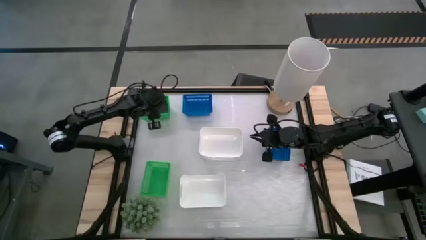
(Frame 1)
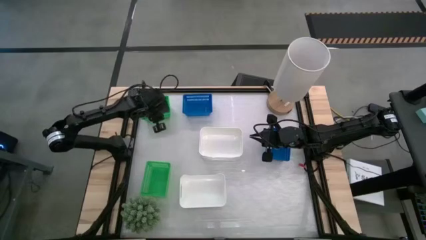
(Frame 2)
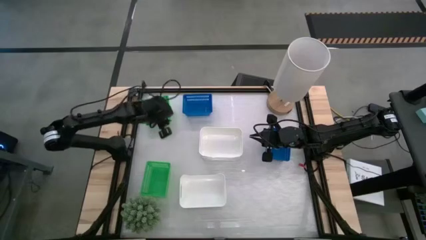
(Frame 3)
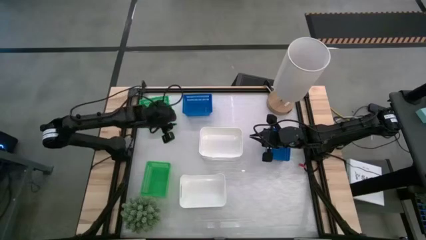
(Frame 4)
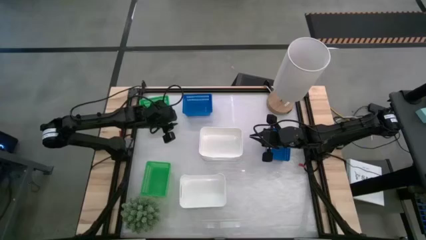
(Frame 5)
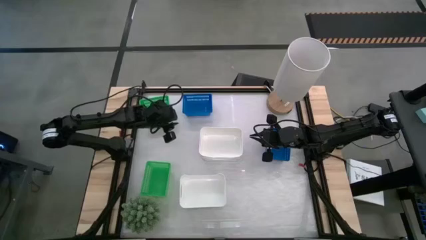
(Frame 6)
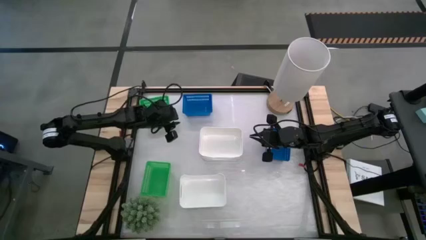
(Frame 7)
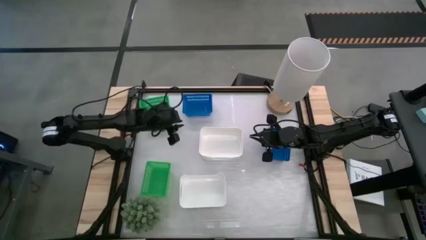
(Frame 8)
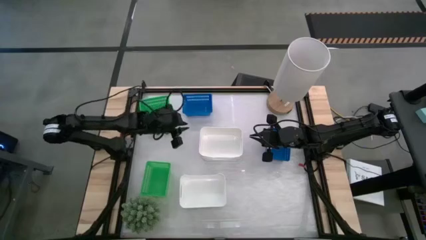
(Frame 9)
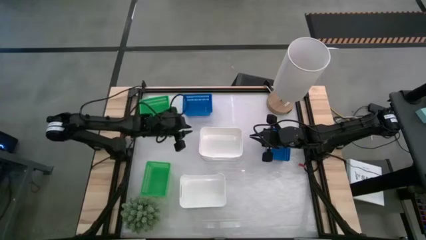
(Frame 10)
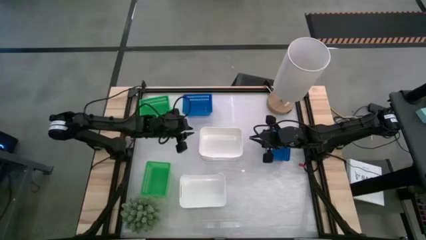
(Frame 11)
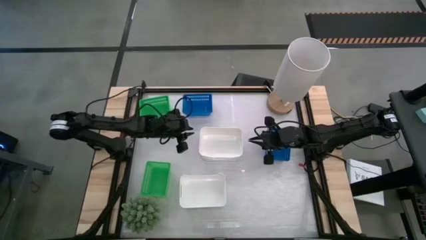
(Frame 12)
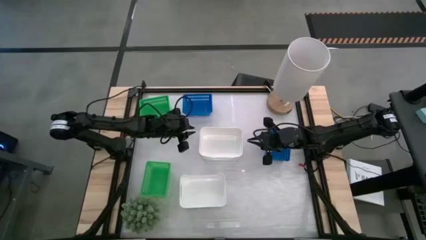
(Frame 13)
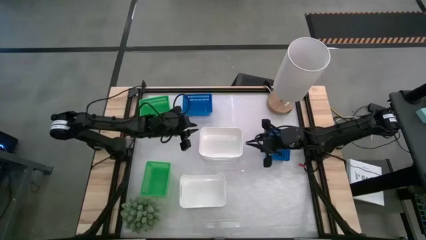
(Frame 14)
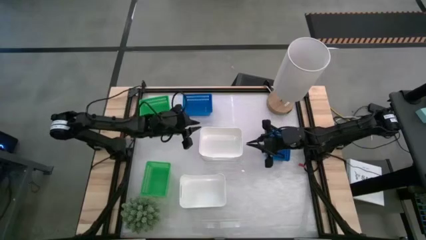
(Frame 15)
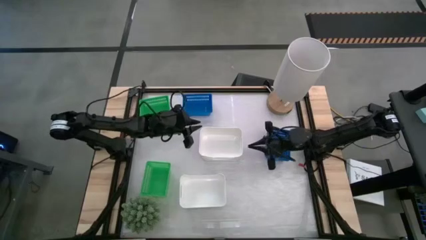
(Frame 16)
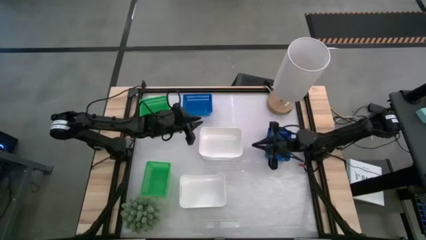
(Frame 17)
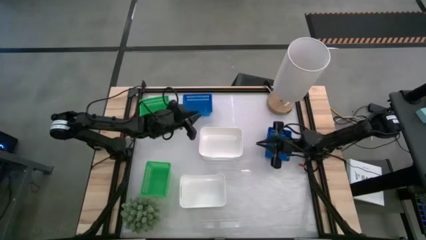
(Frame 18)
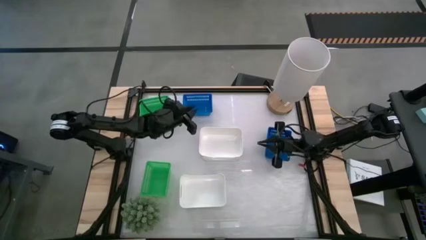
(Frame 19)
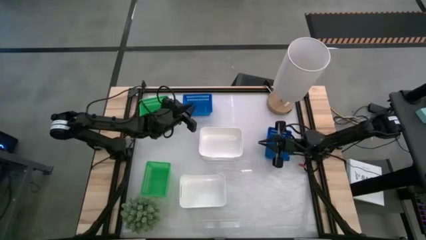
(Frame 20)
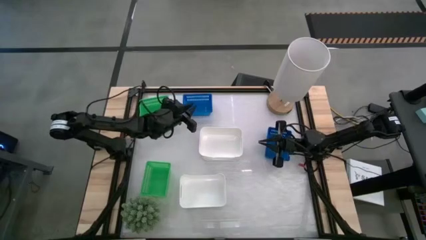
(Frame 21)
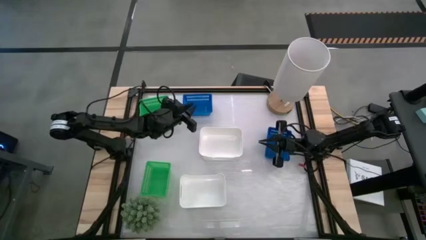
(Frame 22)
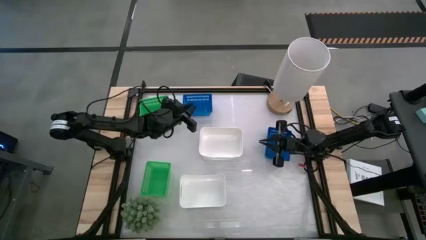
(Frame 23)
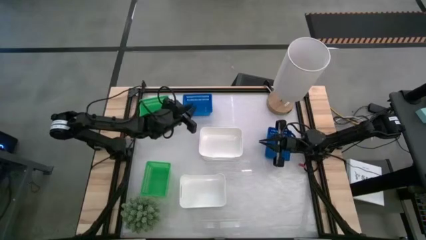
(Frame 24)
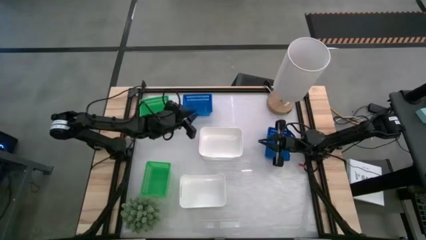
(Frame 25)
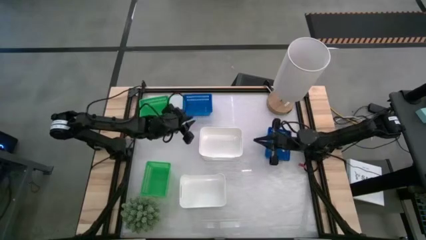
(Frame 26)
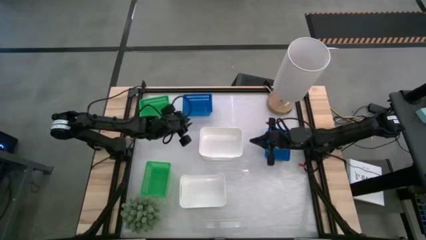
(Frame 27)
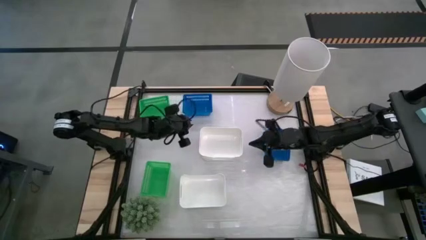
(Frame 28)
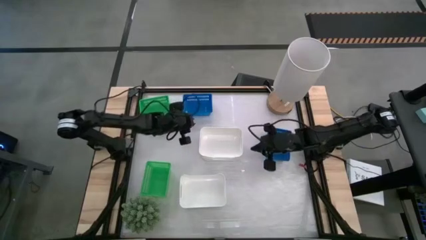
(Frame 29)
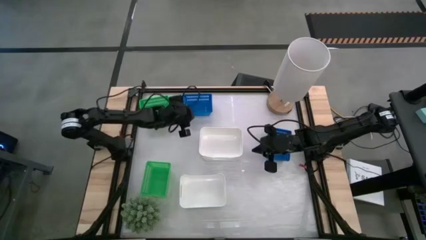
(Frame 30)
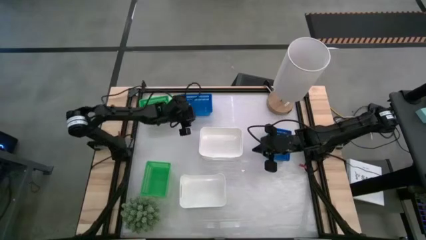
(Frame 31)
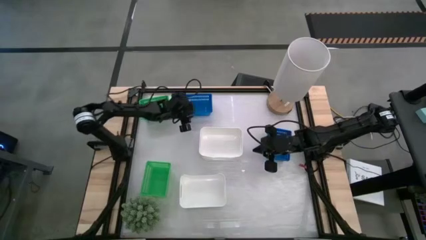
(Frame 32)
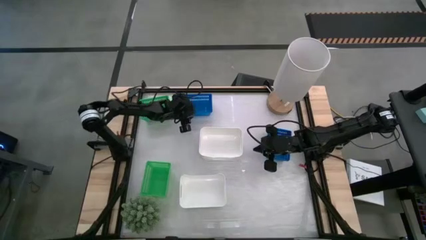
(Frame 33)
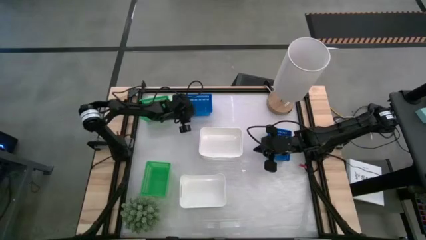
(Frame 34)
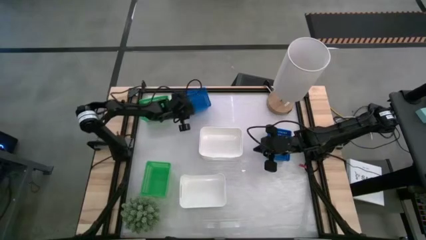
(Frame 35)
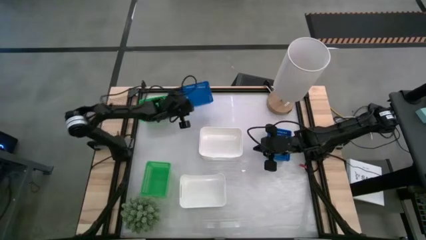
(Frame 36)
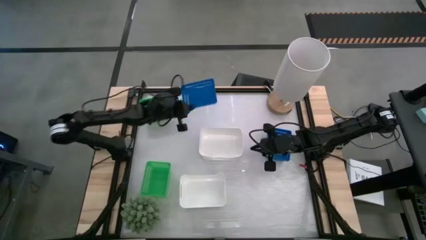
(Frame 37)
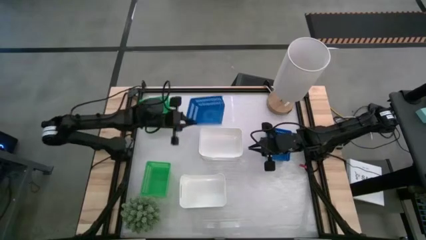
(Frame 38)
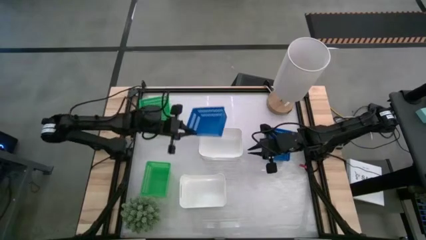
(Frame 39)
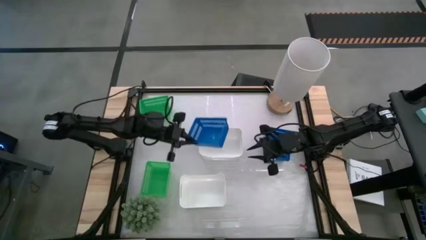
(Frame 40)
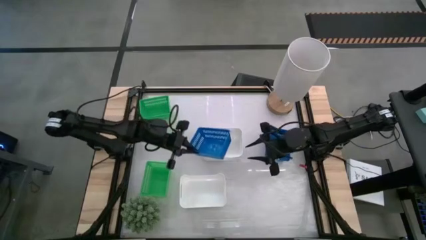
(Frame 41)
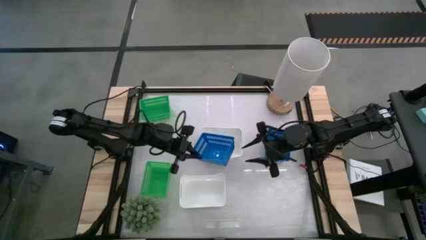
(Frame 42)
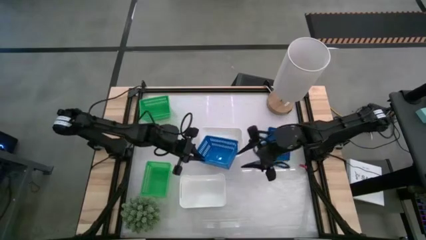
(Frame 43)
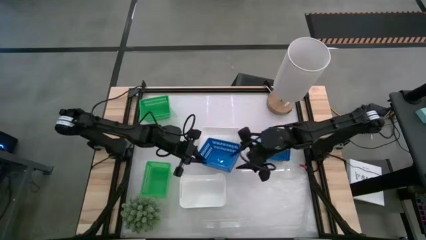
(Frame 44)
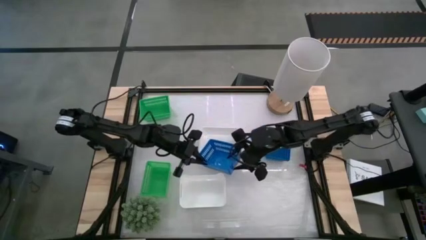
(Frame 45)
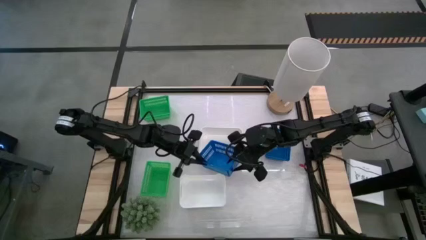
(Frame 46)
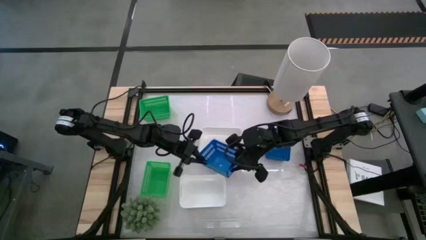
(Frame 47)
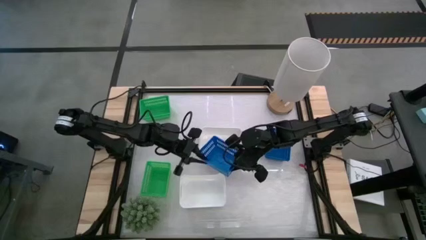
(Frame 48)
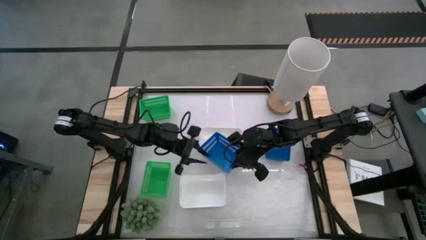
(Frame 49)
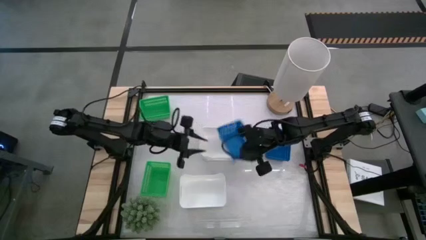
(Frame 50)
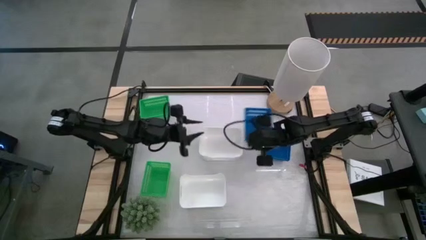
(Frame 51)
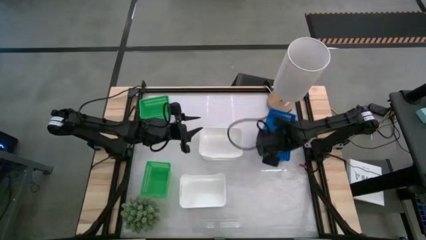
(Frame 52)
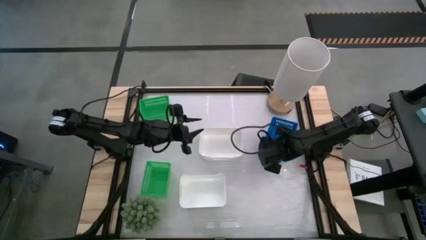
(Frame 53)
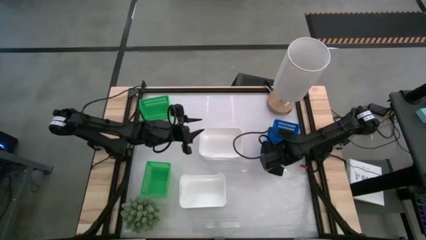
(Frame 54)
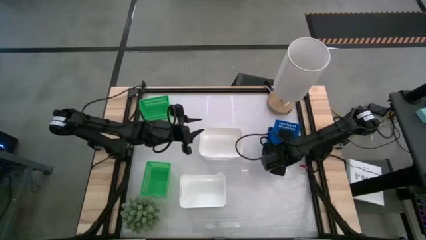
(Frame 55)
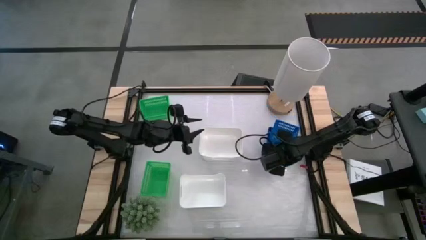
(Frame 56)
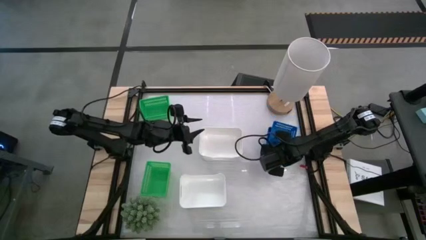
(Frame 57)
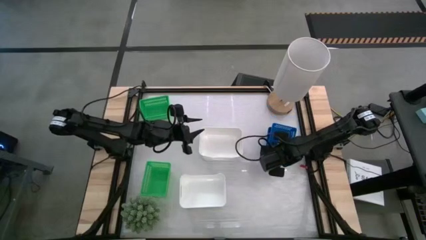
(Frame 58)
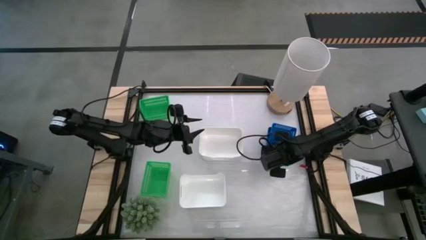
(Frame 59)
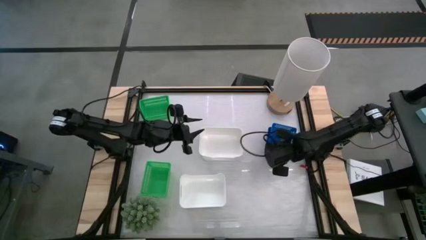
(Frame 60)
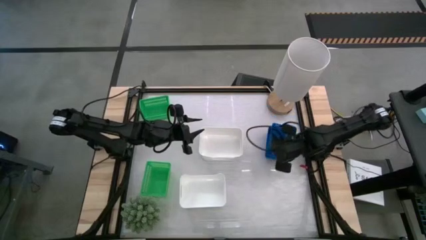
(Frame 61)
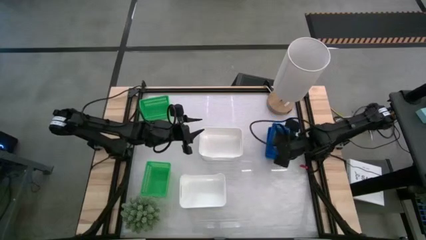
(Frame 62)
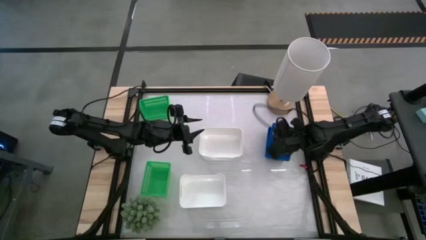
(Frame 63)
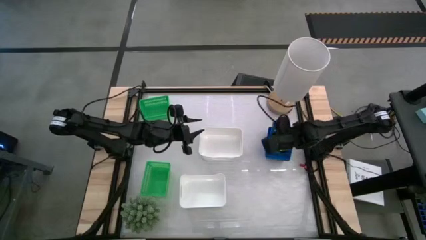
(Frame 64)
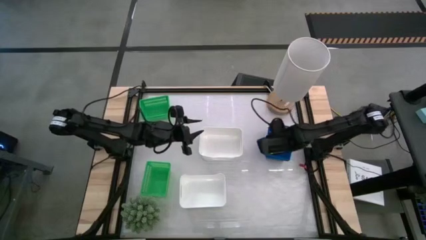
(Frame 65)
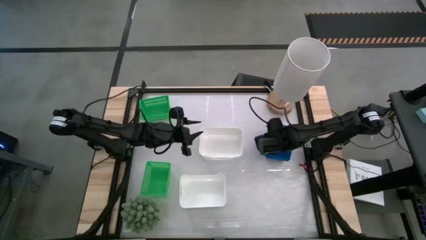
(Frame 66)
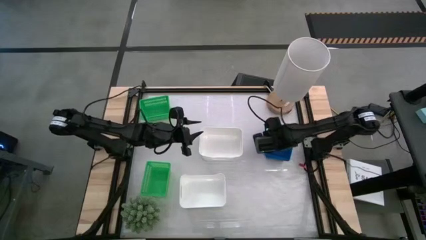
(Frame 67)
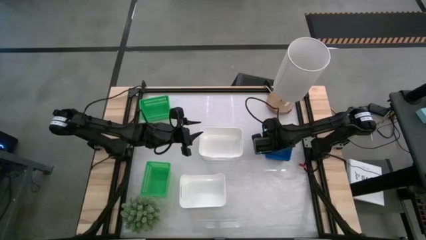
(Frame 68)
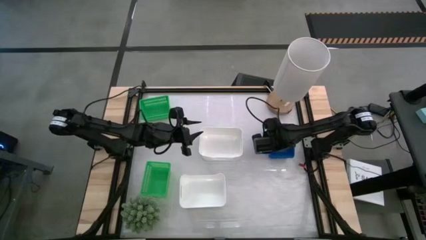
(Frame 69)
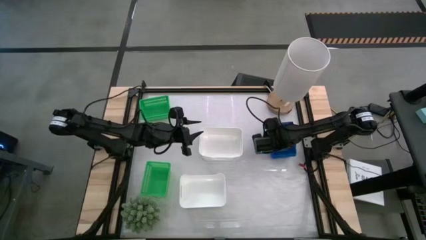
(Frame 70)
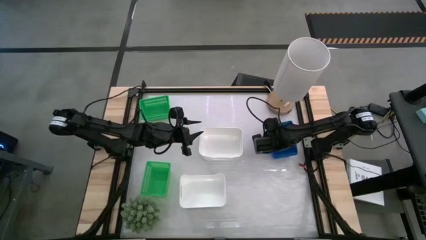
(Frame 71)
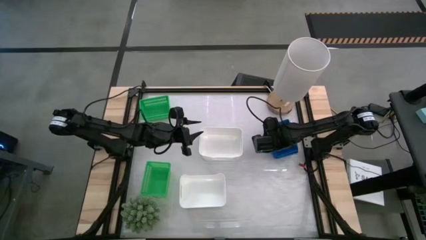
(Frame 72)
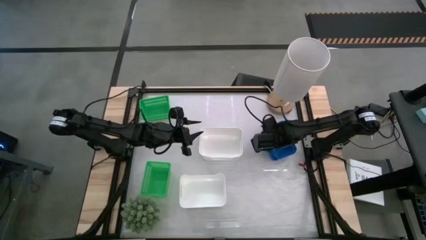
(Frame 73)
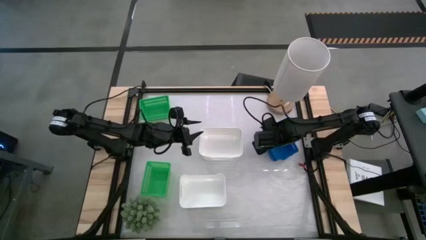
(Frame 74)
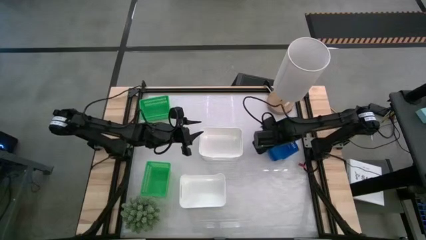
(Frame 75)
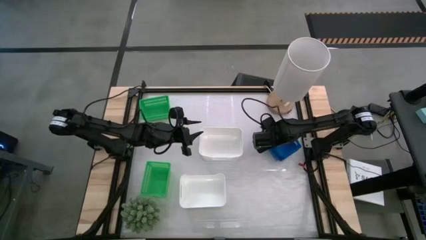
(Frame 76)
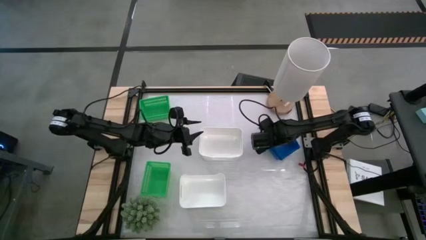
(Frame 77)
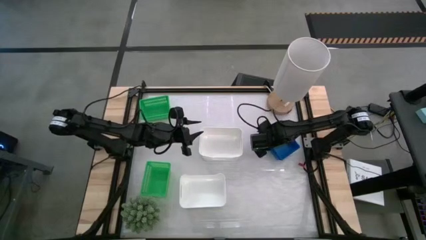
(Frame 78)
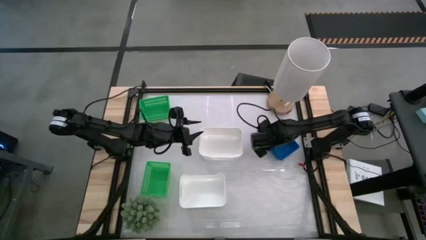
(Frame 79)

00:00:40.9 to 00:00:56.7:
Stack the top blue bin on the bottom blue bins
